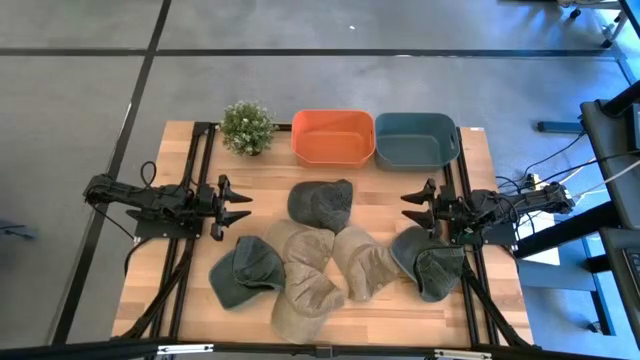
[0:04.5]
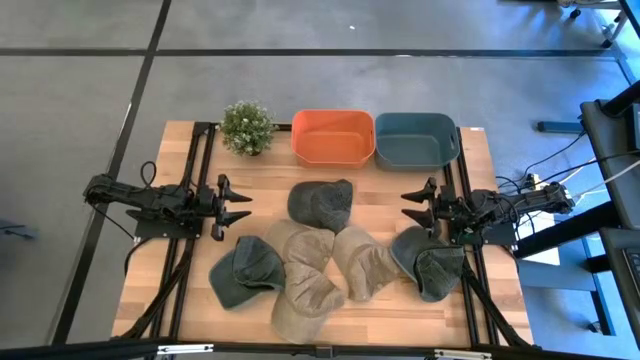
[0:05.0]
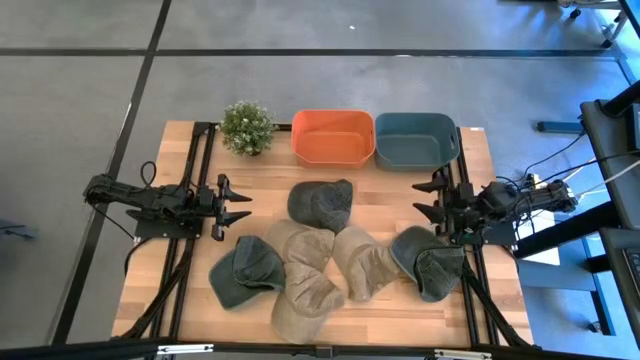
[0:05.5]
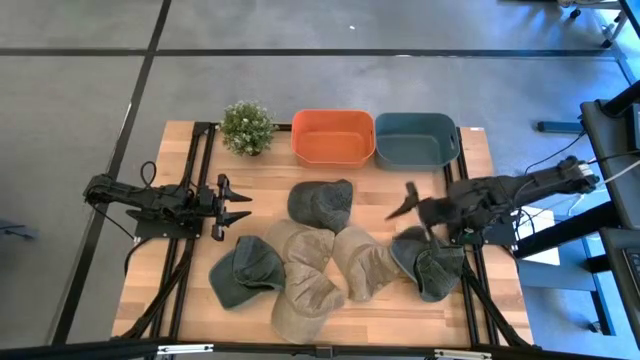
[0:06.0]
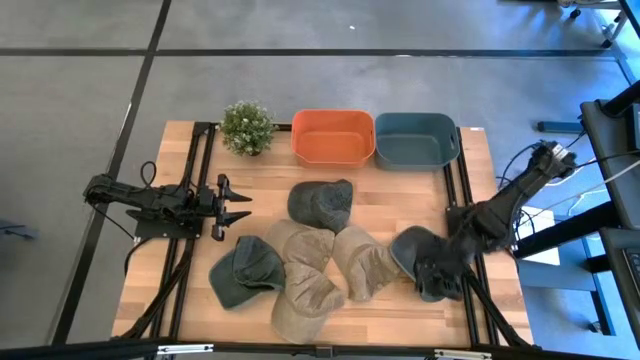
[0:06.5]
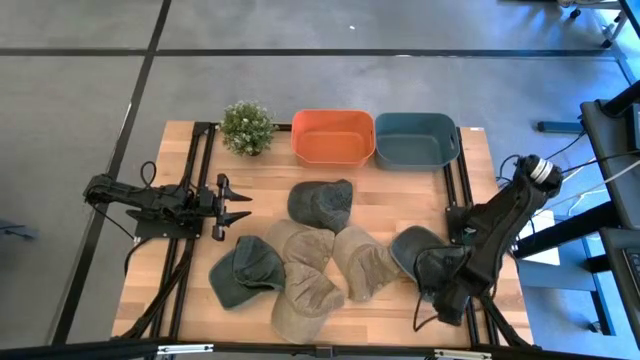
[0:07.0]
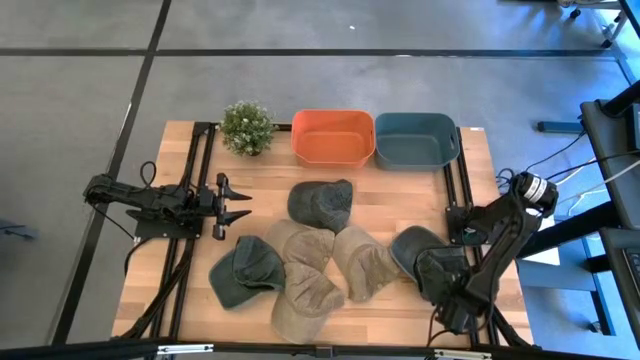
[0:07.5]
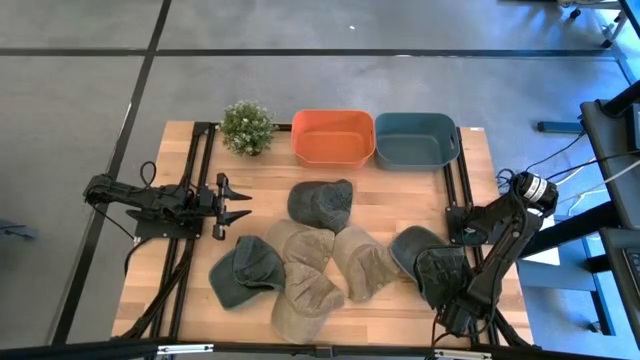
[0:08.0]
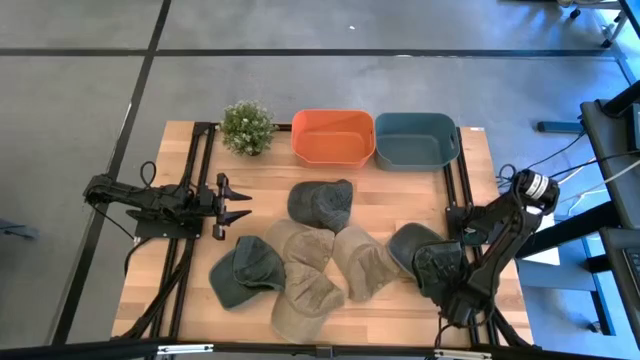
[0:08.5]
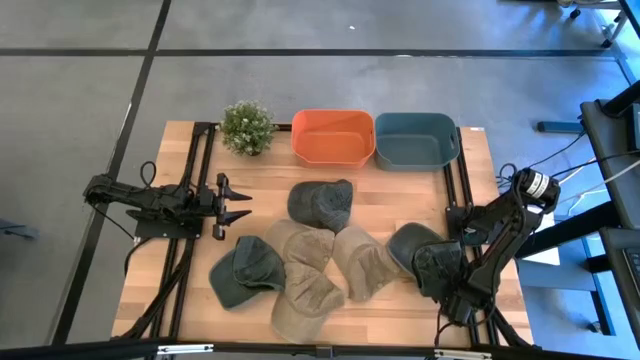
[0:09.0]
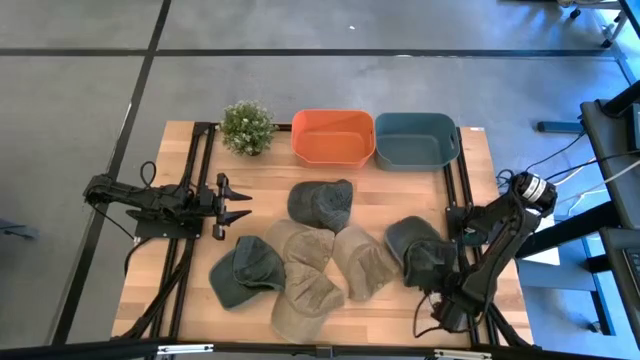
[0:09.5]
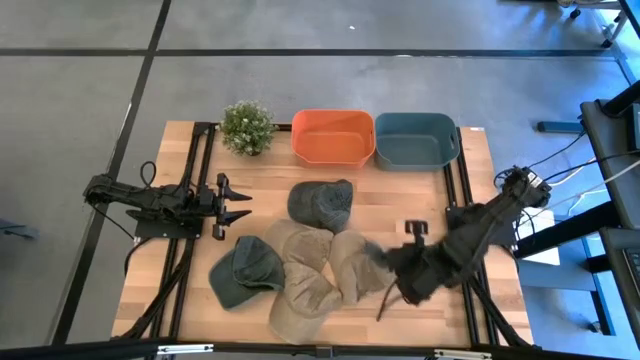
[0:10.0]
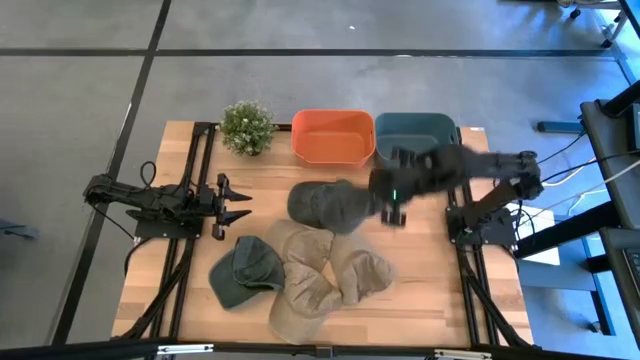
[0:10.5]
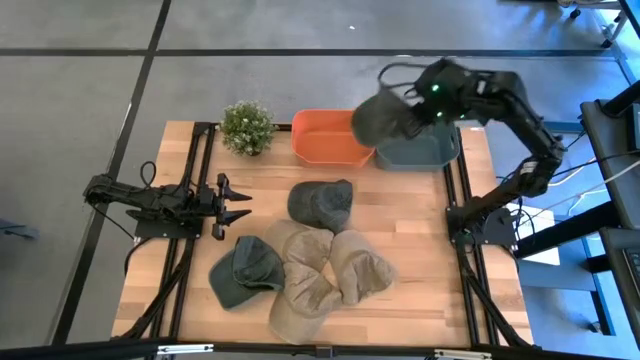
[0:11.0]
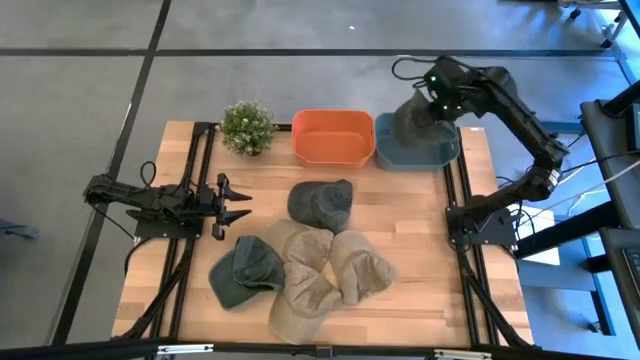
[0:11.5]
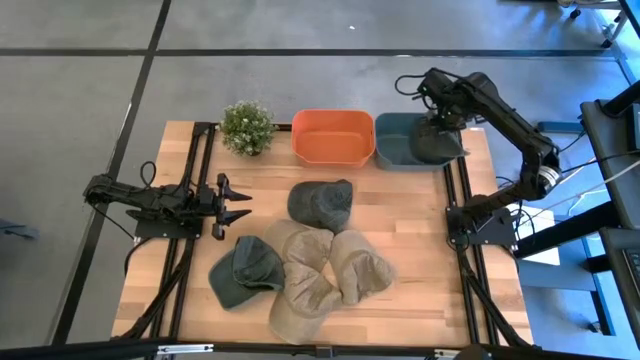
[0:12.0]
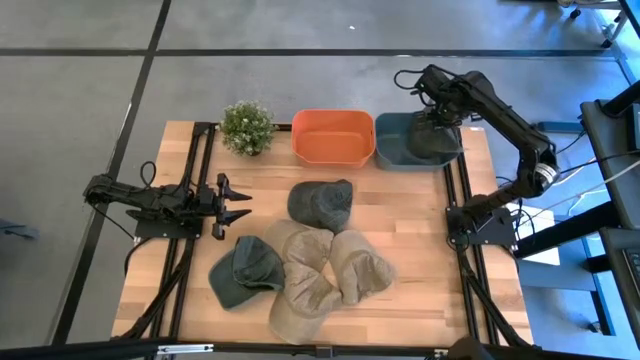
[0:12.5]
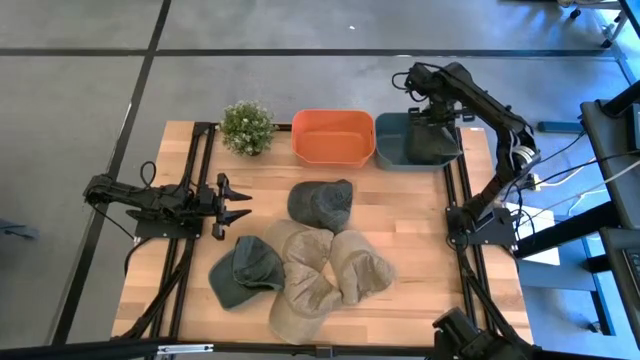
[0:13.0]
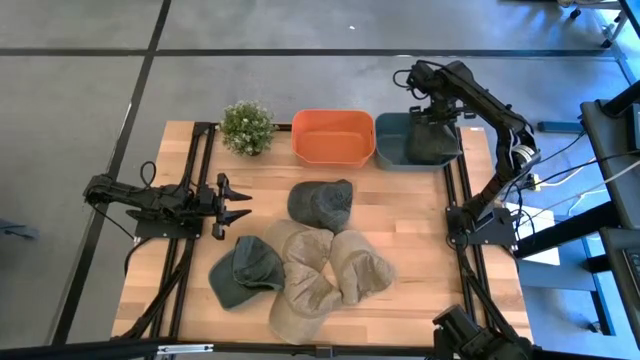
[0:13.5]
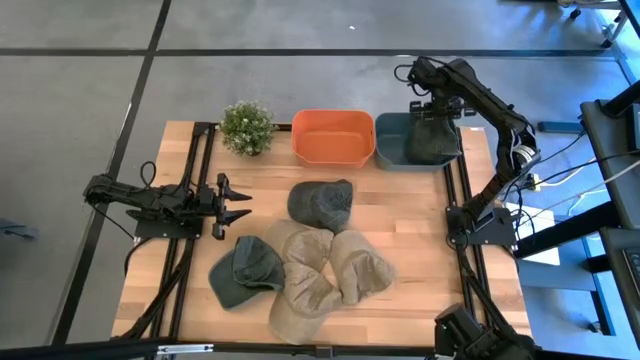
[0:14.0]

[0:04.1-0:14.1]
Task: Pick & Place hat
Put the bottom right black cap into the blue bin

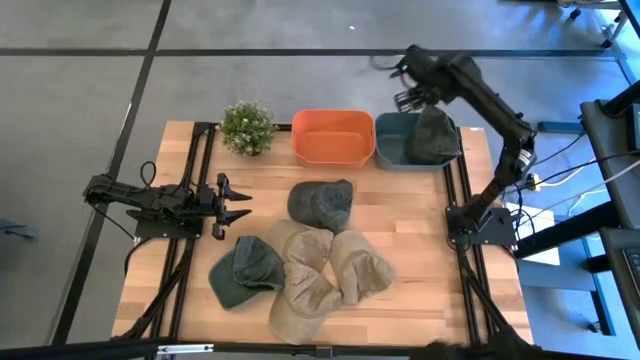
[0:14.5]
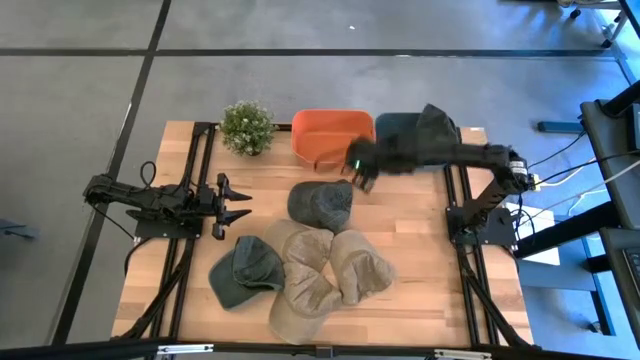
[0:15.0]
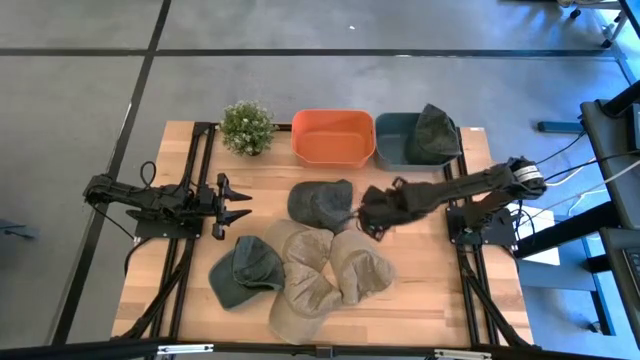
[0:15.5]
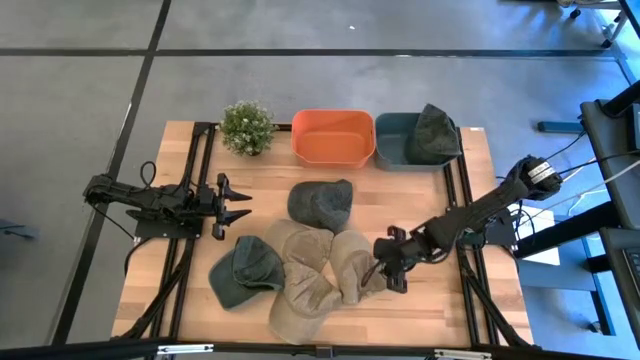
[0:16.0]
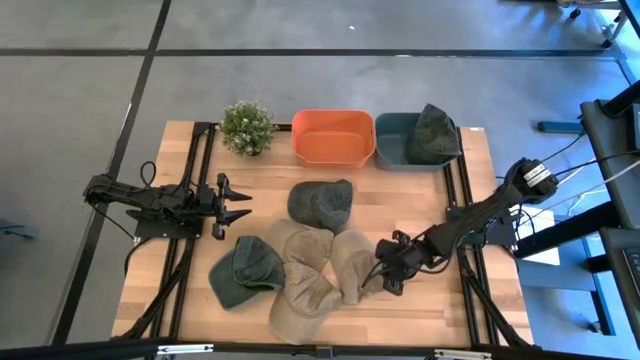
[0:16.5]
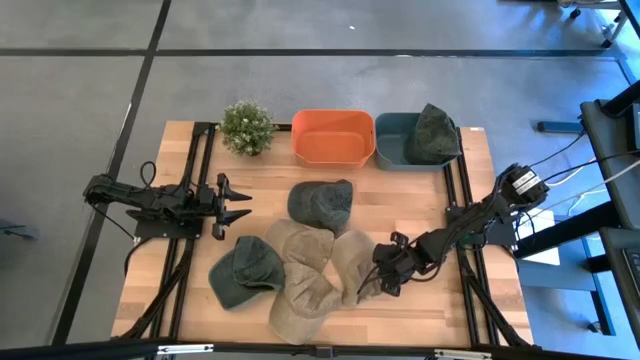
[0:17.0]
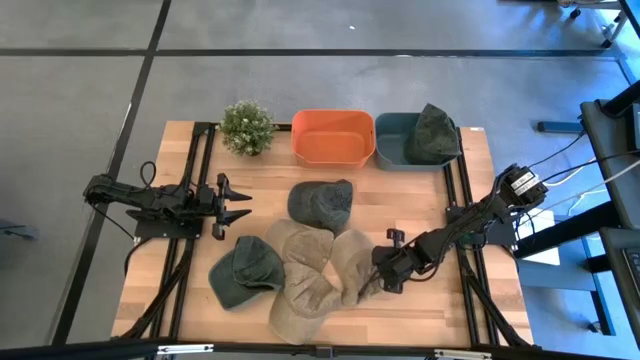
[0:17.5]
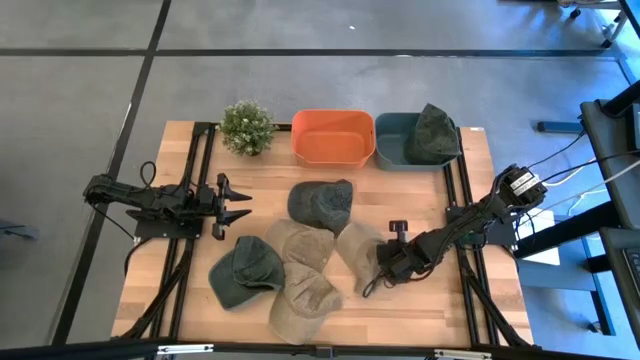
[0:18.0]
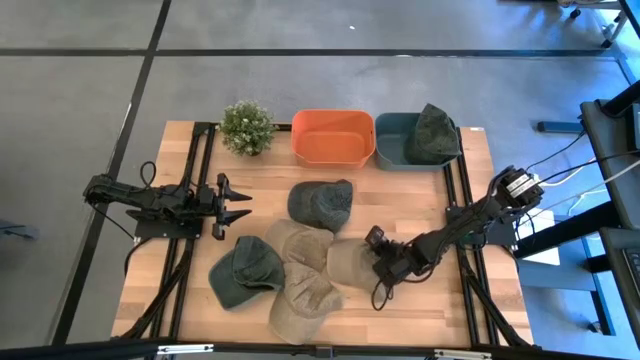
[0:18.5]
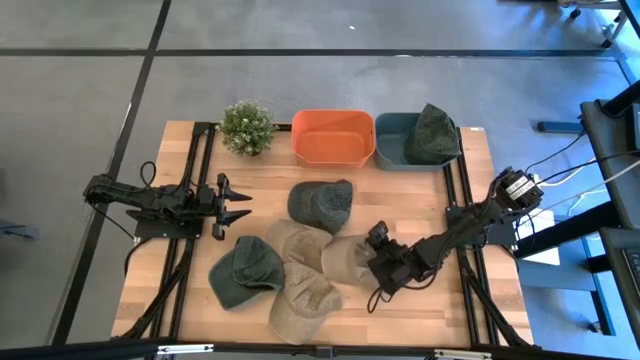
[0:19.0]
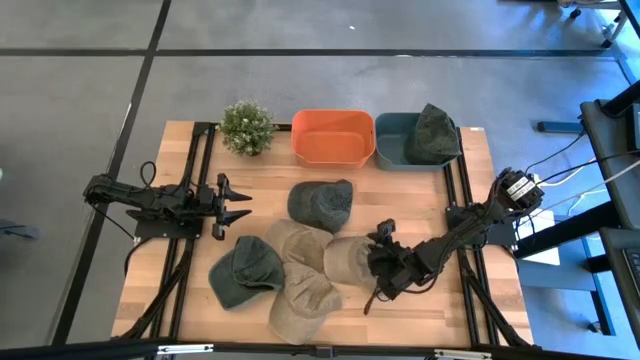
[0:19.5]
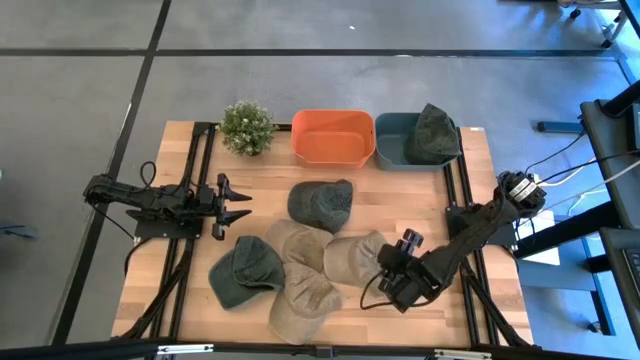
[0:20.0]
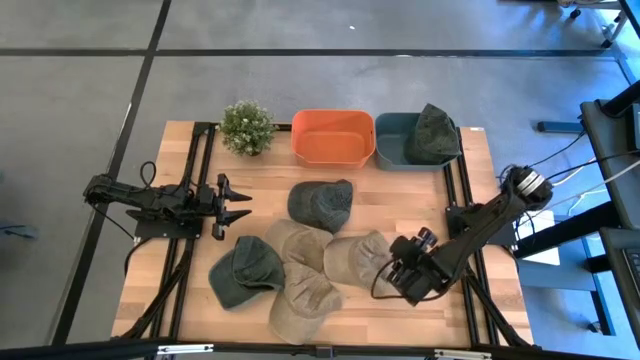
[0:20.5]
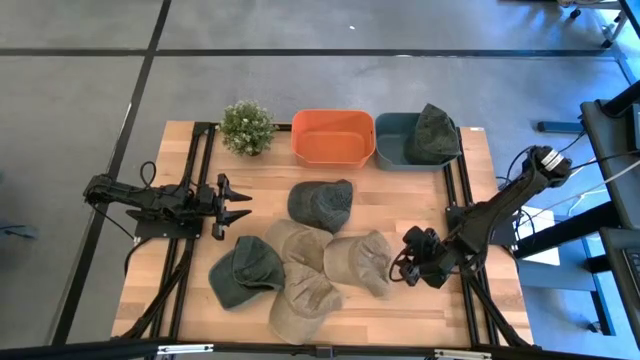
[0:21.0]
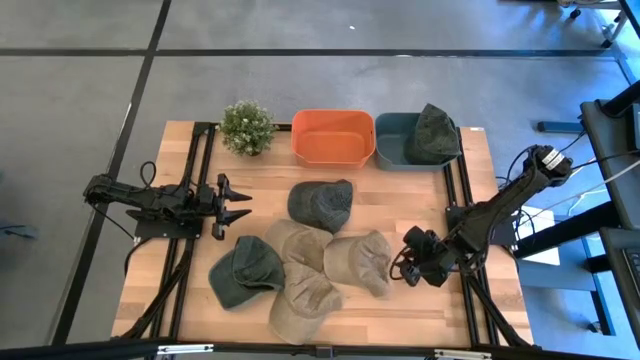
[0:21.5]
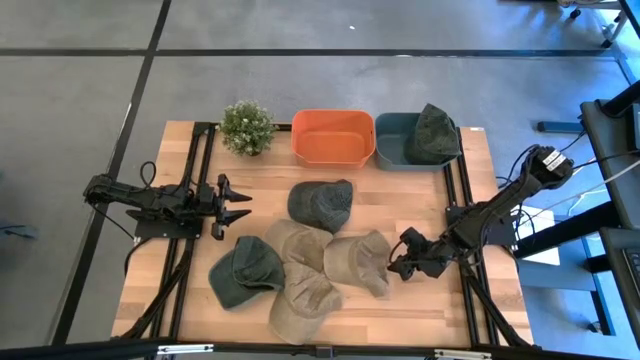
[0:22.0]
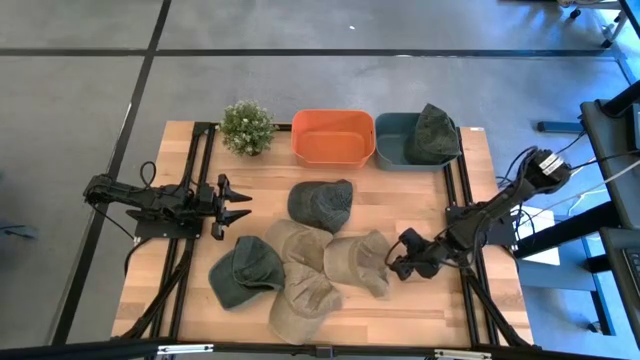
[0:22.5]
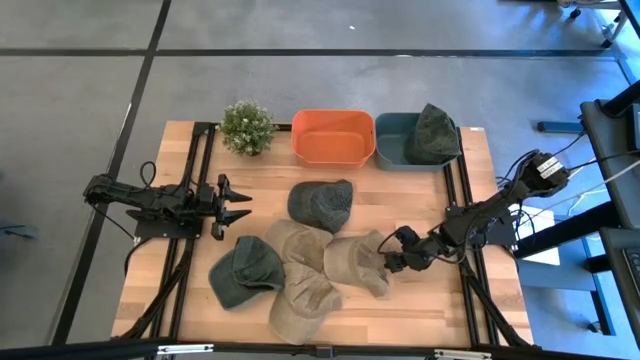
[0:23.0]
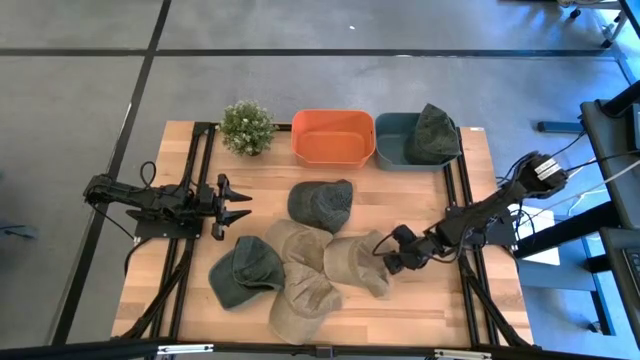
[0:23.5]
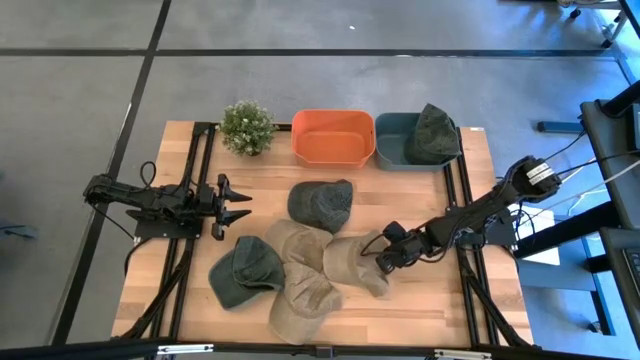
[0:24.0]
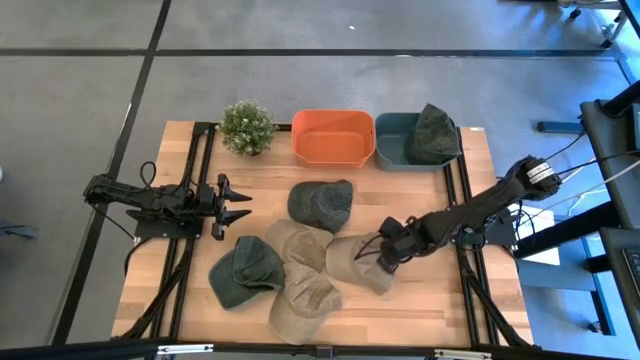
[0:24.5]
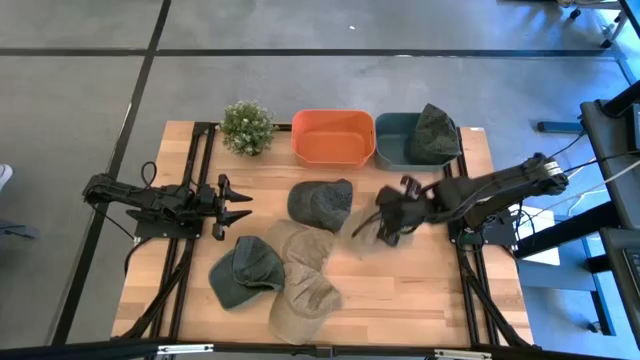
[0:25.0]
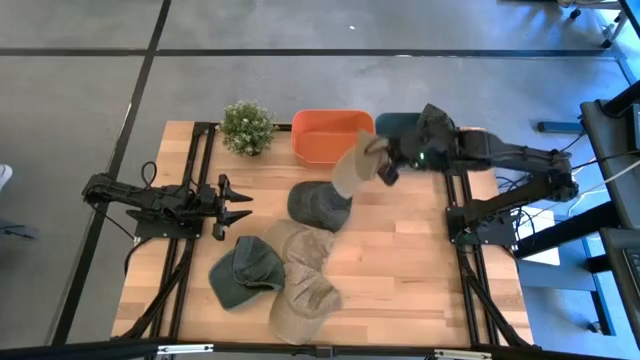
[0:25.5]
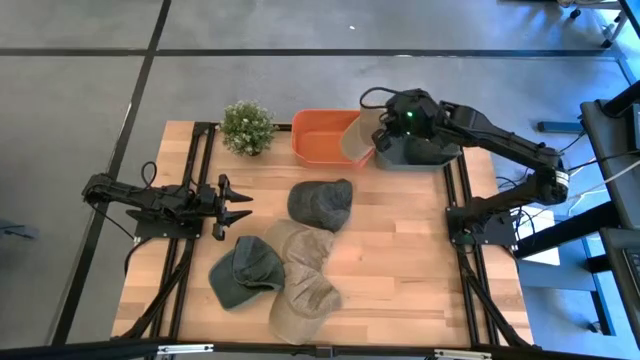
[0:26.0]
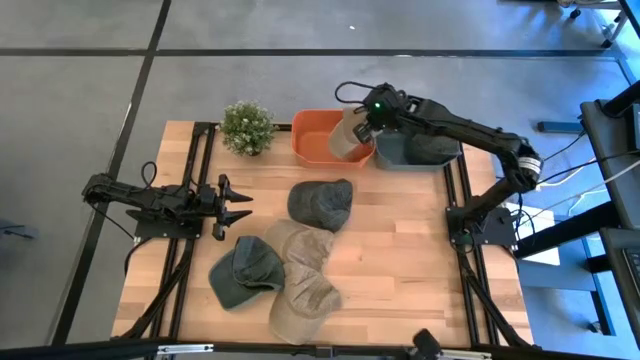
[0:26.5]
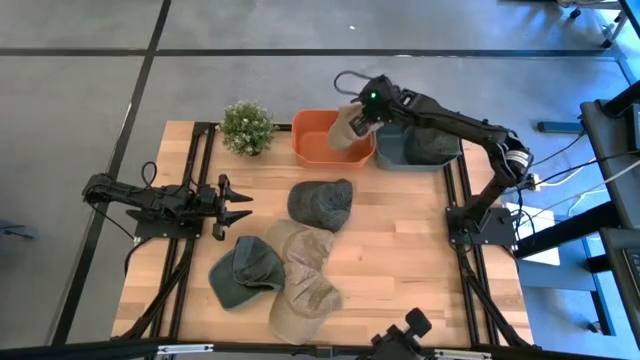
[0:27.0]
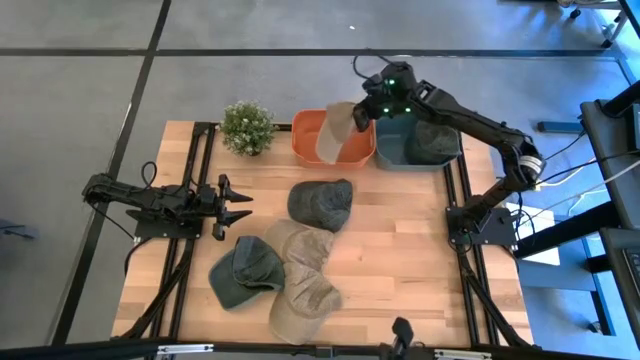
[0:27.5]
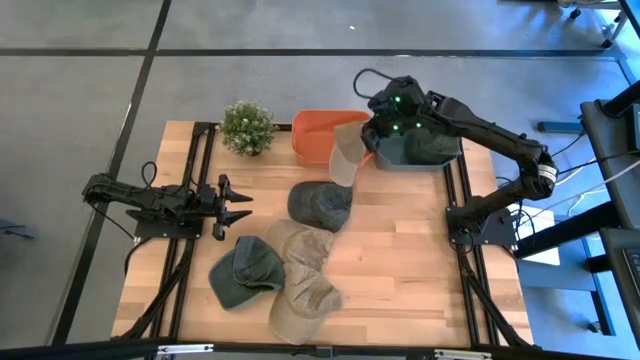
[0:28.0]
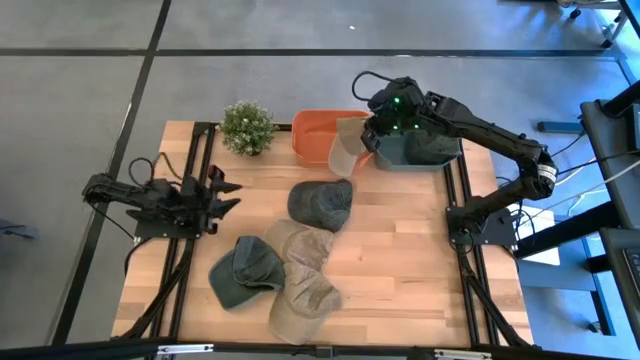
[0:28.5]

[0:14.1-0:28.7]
Put the right brown cap into the orange bin
